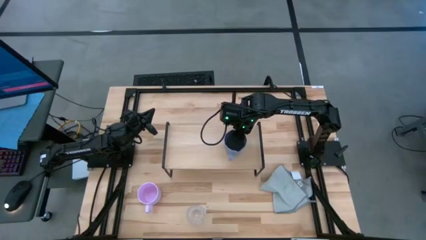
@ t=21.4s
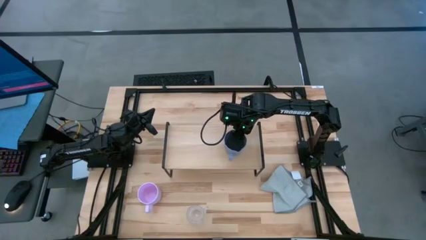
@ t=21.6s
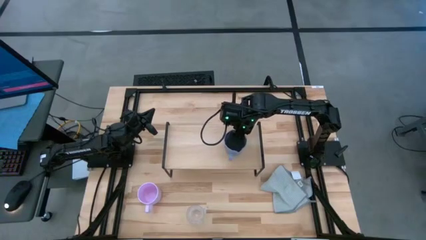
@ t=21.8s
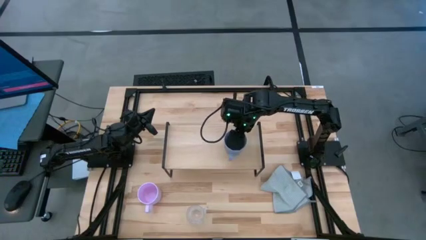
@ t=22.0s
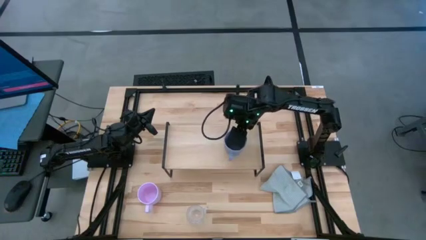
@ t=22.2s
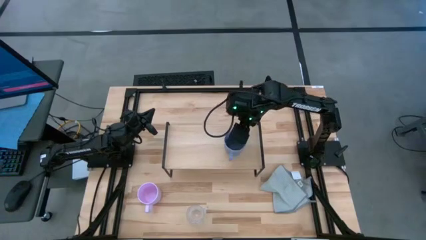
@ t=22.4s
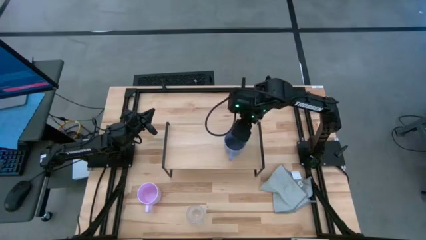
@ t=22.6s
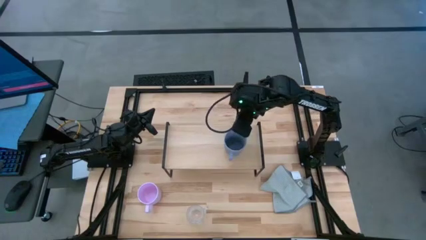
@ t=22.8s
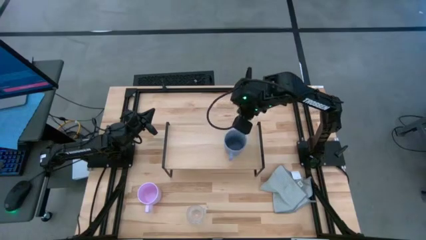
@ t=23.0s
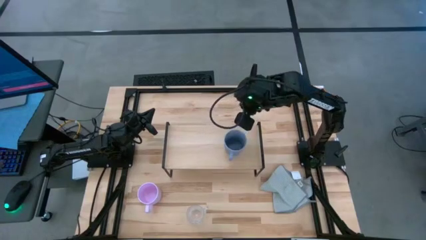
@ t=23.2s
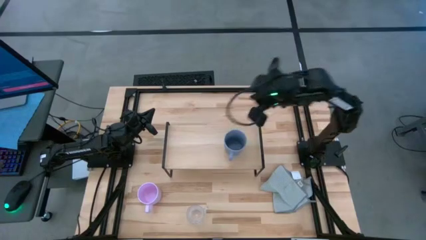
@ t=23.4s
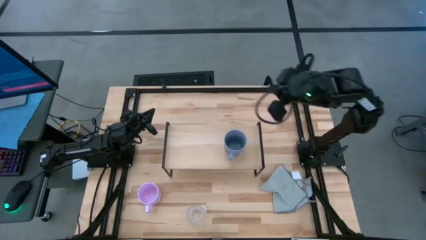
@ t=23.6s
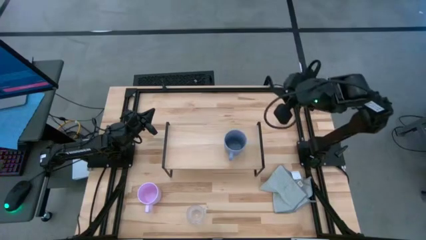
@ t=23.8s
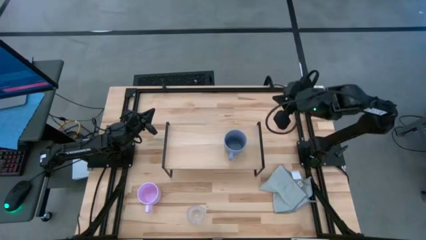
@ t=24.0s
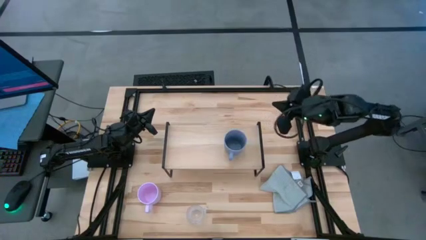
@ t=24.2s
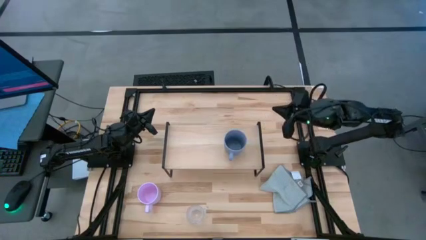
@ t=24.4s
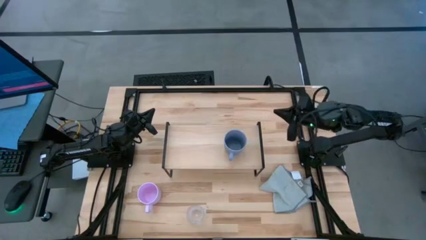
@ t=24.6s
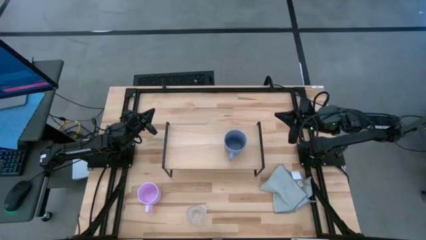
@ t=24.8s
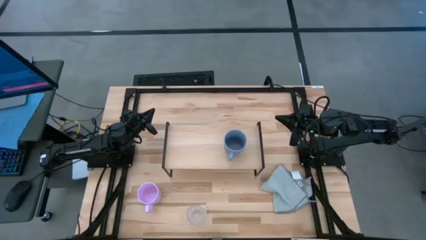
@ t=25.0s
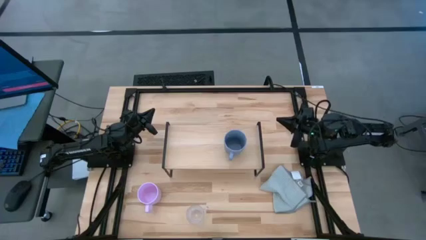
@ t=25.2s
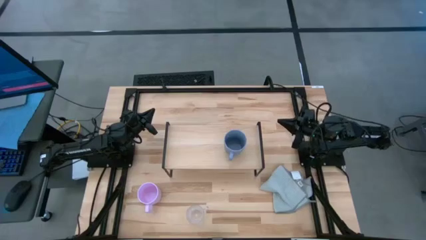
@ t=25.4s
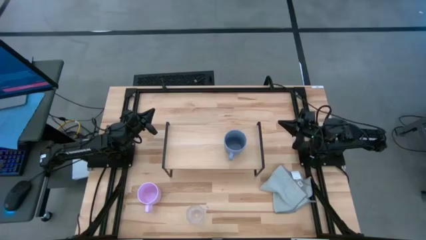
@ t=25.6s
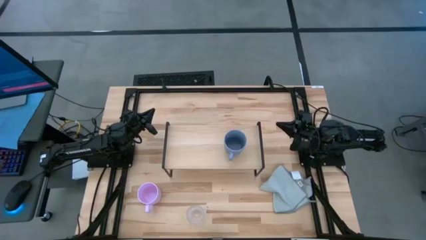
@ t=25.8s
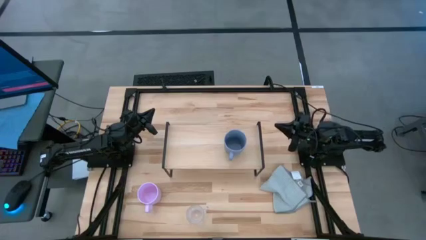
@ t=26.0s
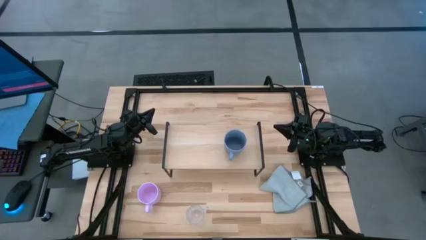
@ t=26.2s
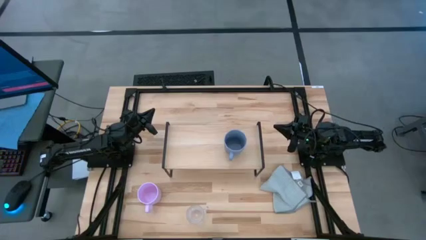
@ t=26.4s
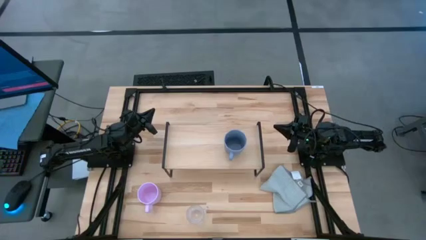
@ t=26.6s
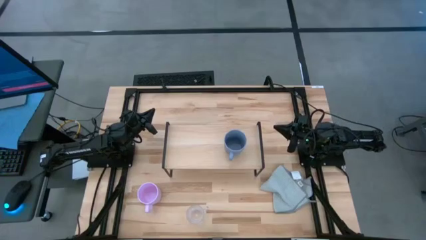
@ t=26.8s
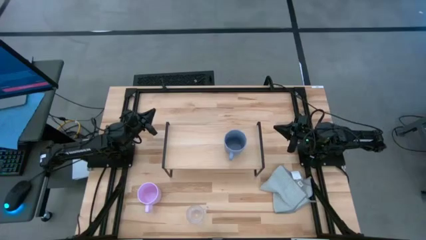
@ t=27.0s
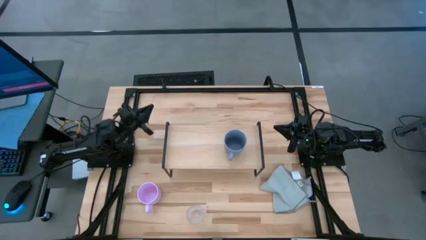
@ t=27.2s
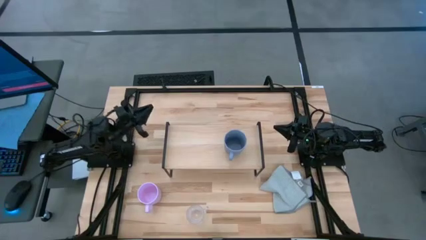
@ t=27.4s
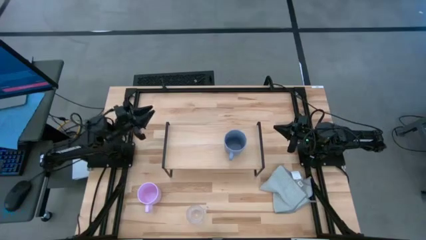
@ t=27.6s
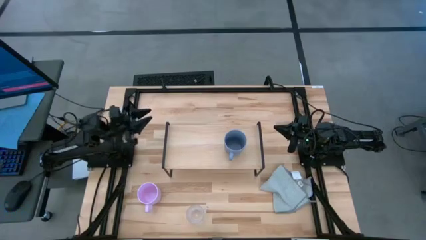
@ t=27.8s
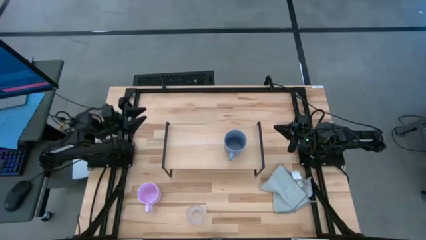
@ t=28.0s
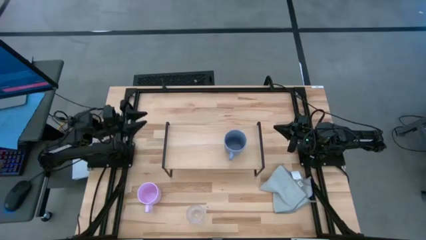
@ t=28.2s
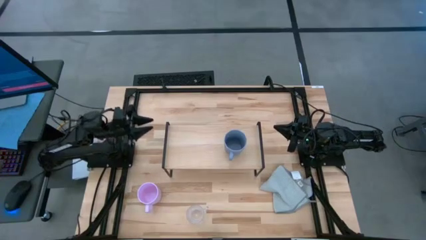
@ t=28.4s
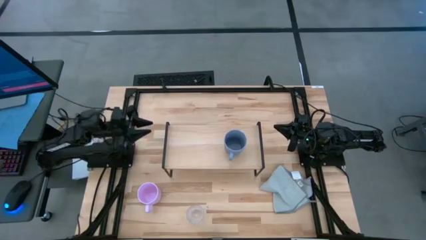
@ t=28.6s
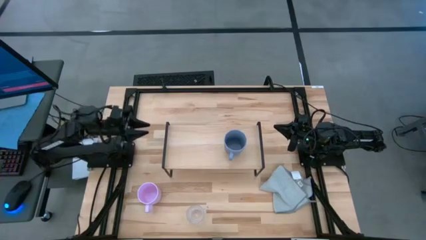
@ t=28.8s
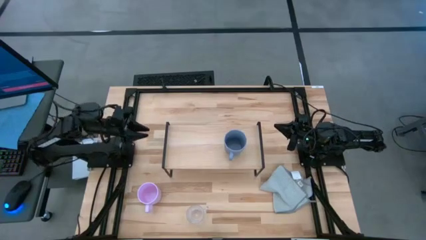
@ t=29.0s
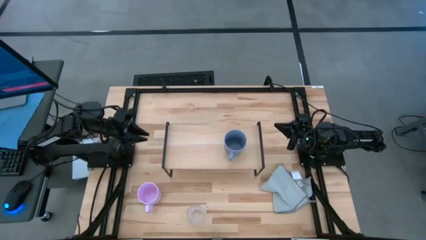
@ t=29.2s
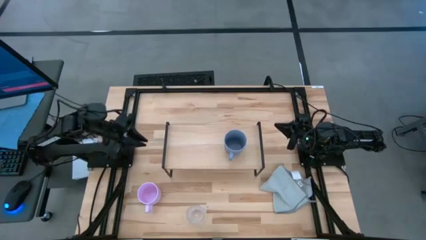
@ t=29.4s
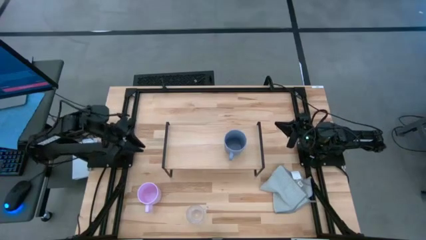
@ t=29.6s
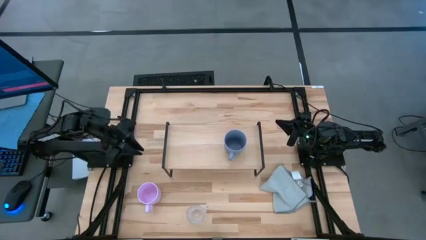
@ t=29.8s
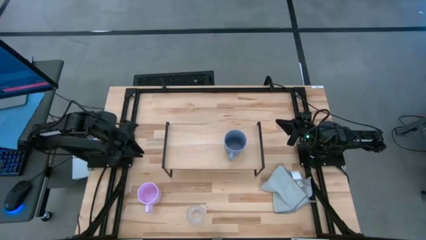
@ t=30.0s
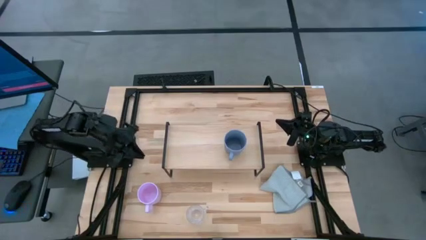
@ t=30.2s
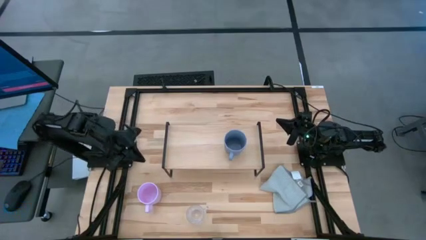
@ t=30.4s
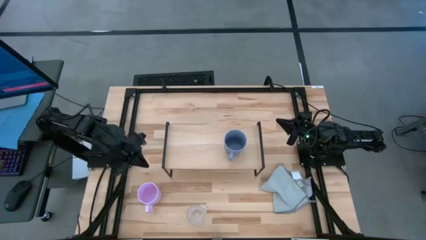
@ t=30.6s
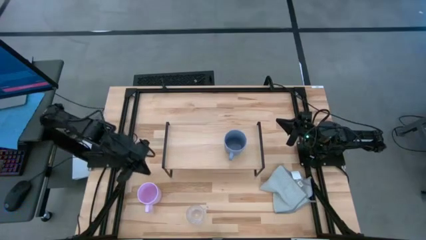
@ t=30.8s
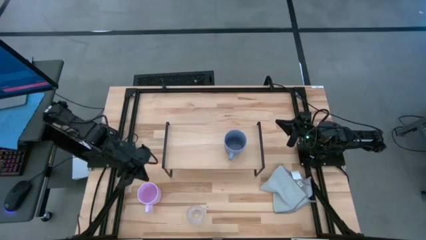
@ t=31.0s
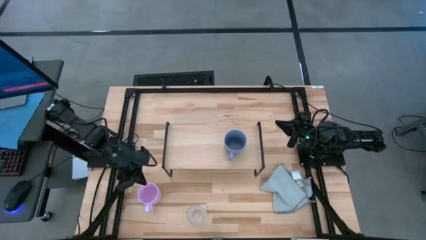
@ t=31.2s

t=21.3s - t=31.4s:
Task: Stack small to large cups/mugs on shelf
Put the pink mug on the shelf
